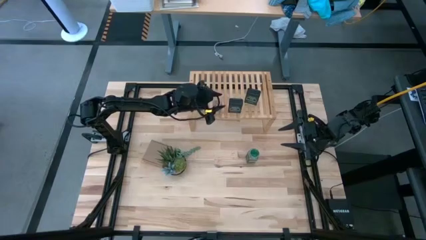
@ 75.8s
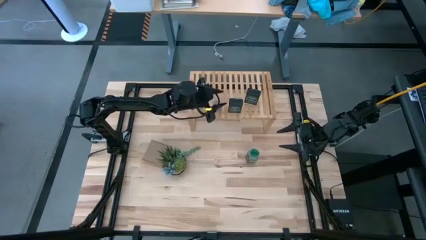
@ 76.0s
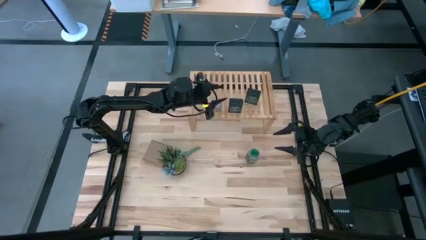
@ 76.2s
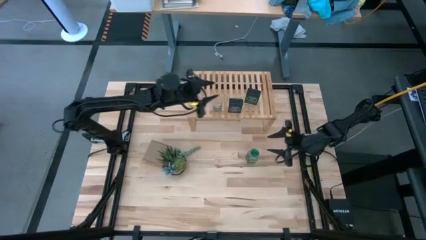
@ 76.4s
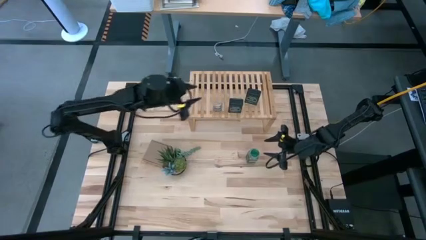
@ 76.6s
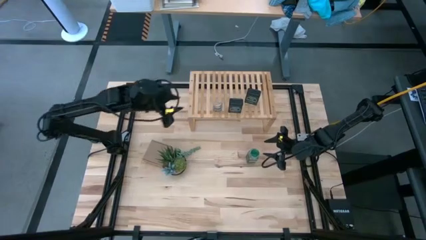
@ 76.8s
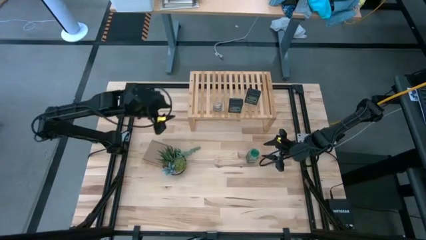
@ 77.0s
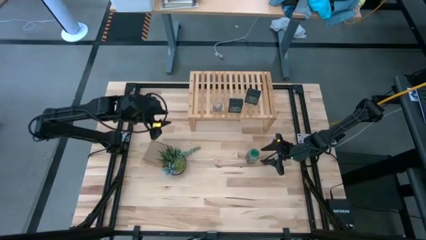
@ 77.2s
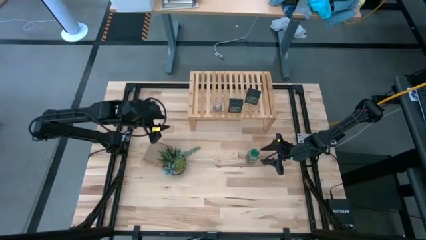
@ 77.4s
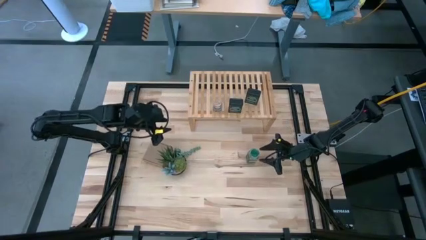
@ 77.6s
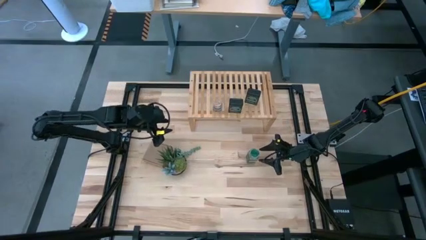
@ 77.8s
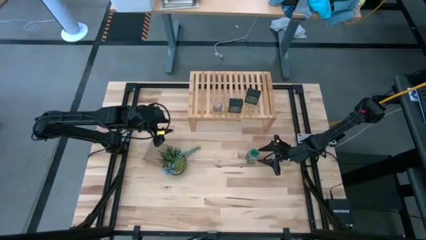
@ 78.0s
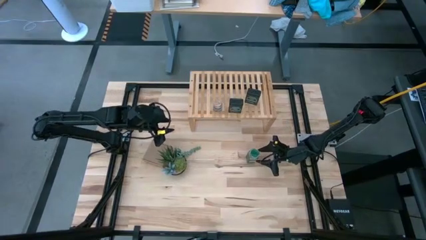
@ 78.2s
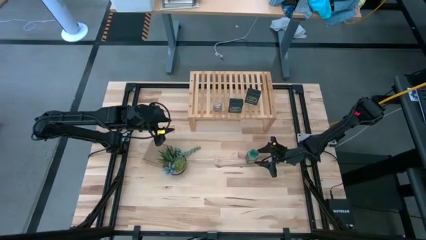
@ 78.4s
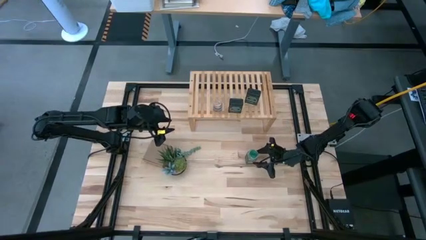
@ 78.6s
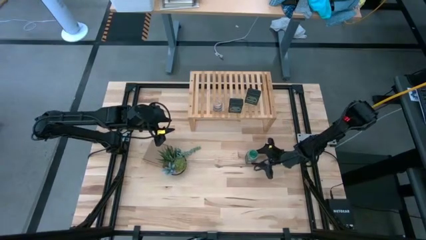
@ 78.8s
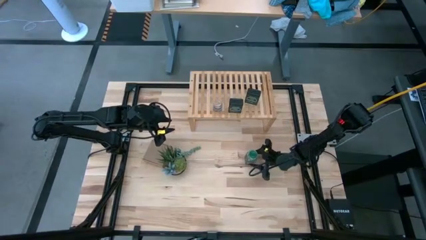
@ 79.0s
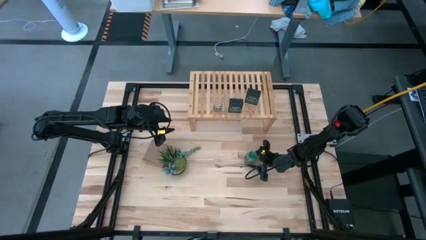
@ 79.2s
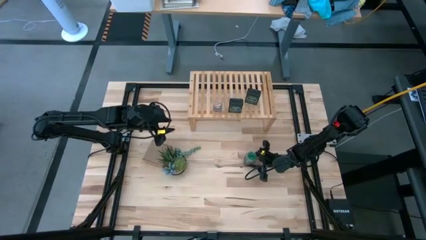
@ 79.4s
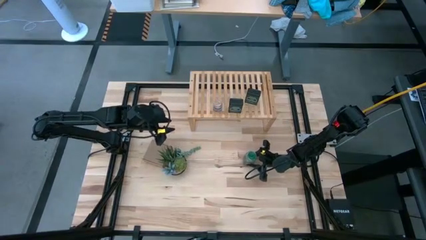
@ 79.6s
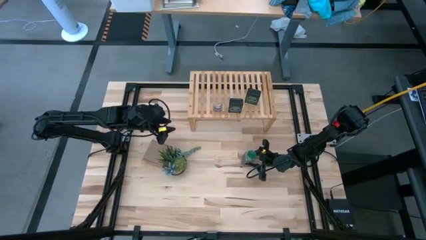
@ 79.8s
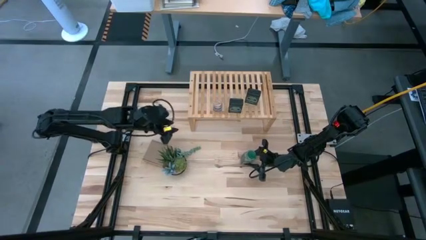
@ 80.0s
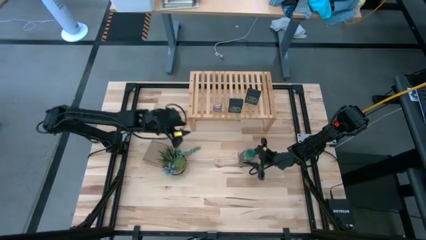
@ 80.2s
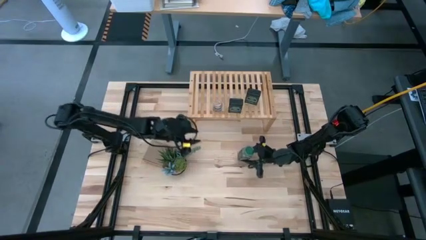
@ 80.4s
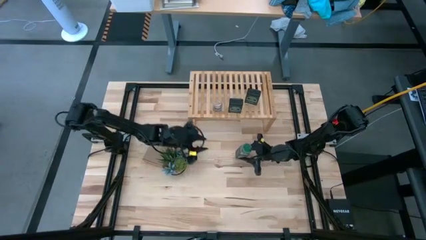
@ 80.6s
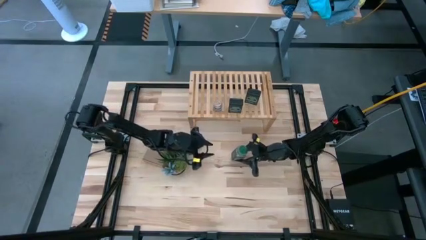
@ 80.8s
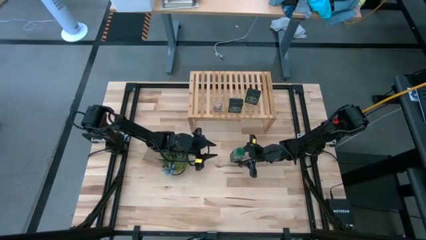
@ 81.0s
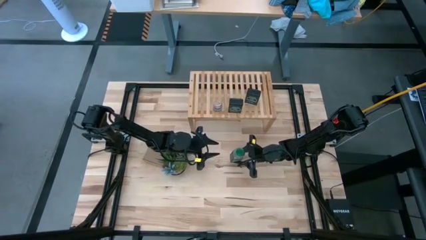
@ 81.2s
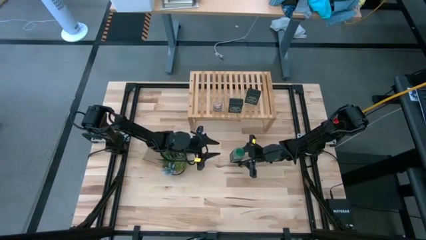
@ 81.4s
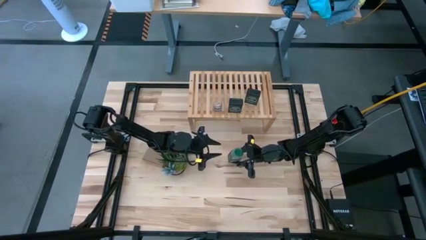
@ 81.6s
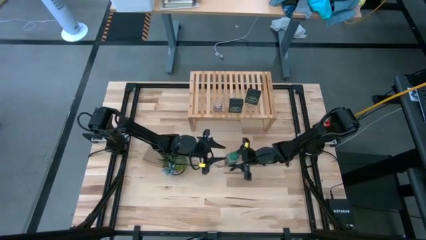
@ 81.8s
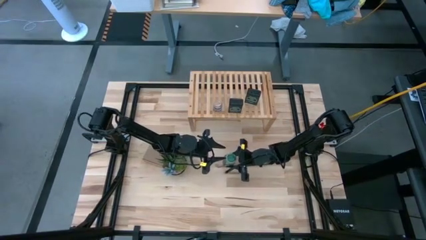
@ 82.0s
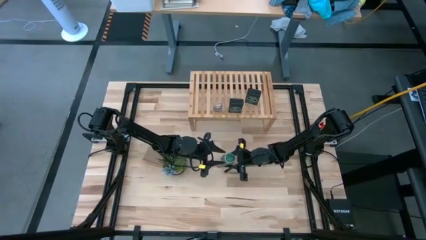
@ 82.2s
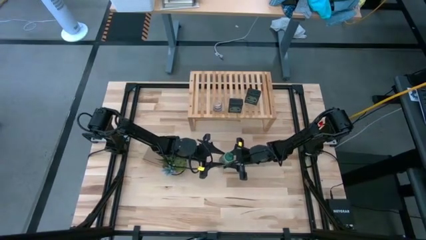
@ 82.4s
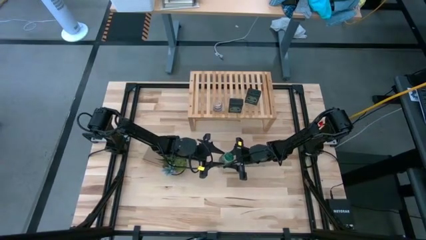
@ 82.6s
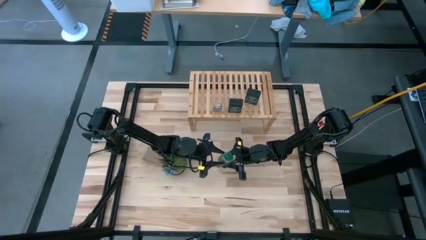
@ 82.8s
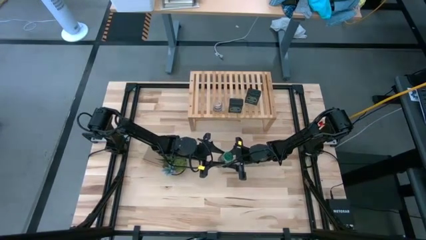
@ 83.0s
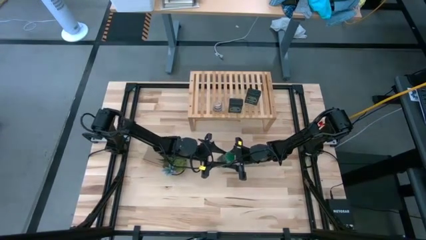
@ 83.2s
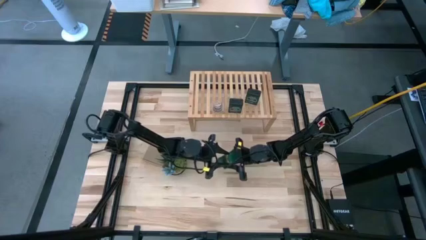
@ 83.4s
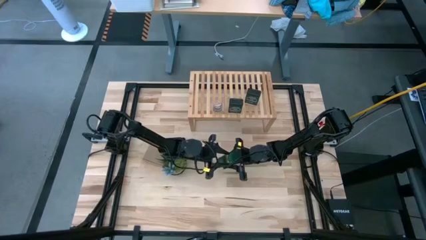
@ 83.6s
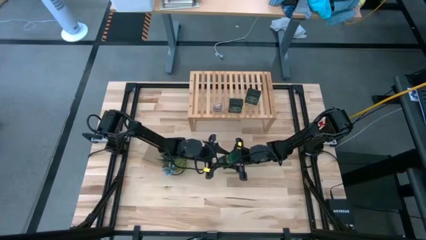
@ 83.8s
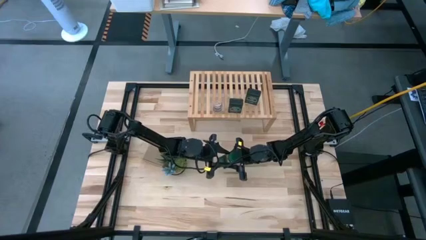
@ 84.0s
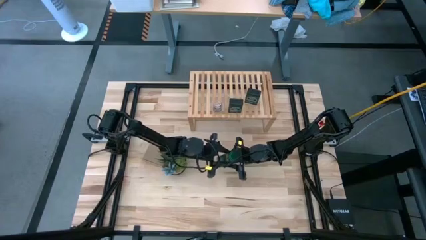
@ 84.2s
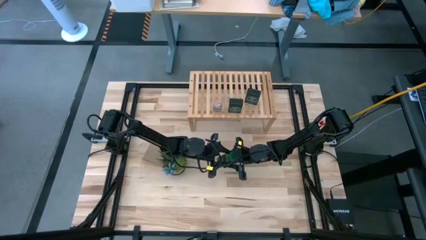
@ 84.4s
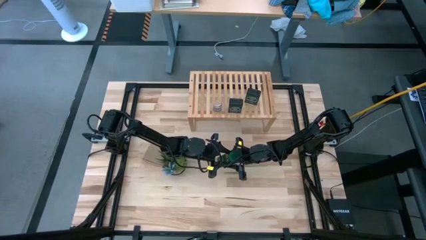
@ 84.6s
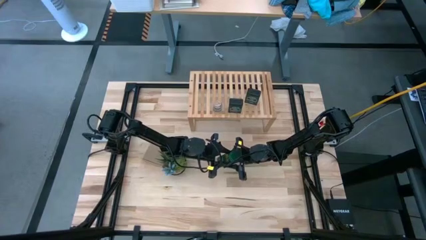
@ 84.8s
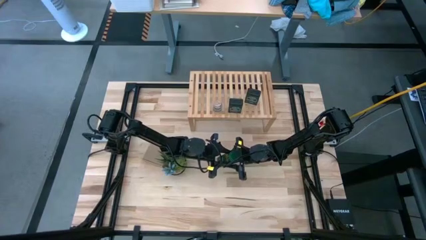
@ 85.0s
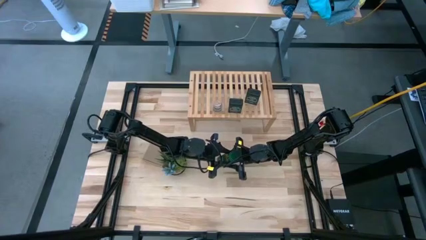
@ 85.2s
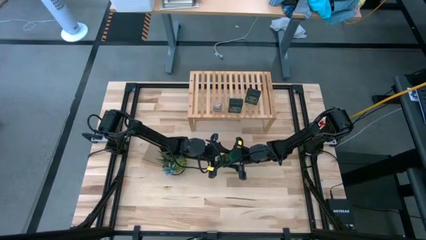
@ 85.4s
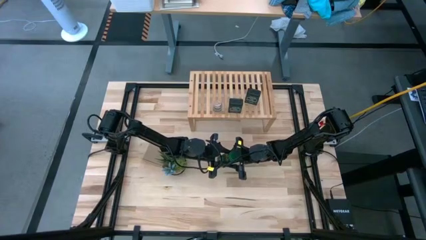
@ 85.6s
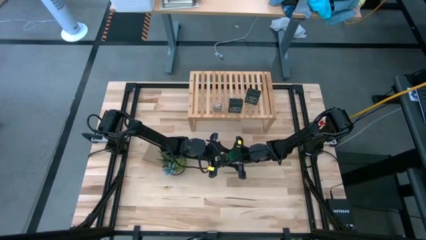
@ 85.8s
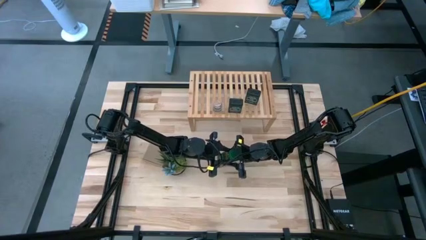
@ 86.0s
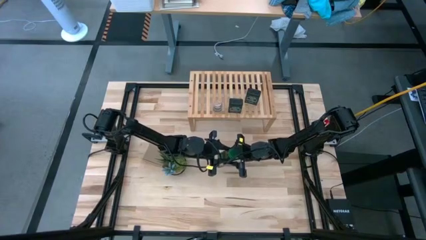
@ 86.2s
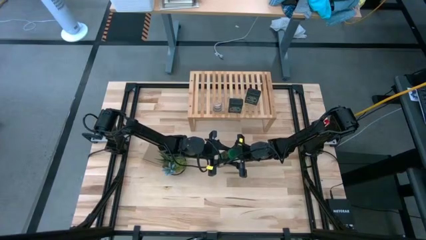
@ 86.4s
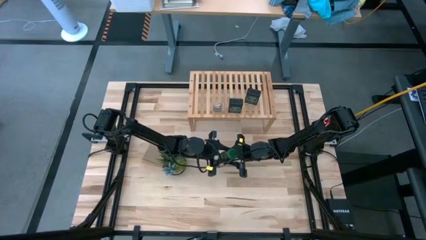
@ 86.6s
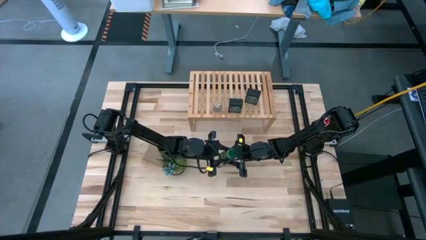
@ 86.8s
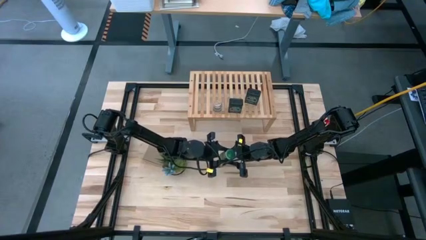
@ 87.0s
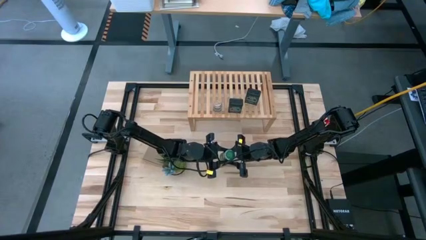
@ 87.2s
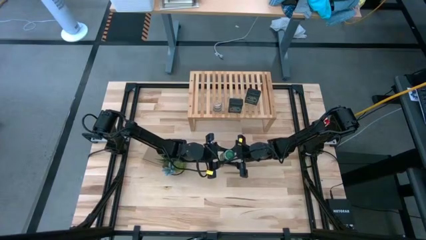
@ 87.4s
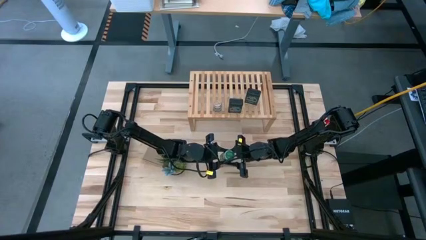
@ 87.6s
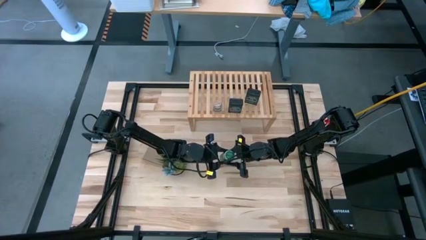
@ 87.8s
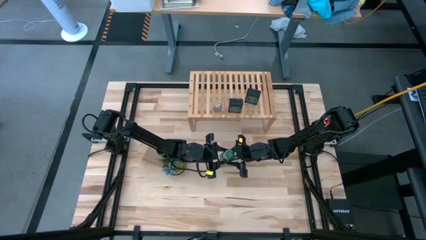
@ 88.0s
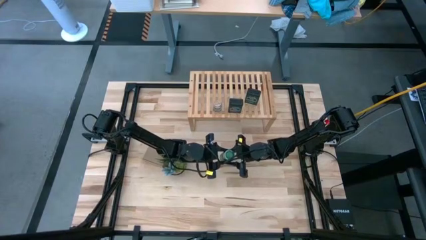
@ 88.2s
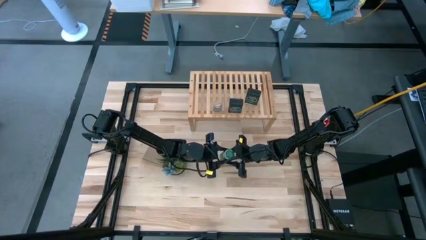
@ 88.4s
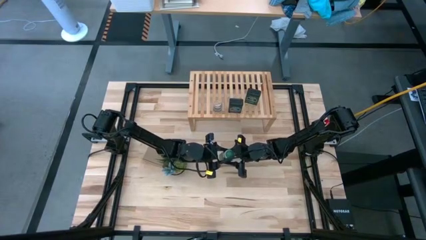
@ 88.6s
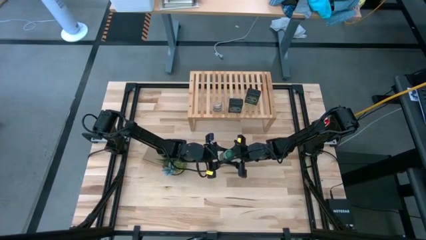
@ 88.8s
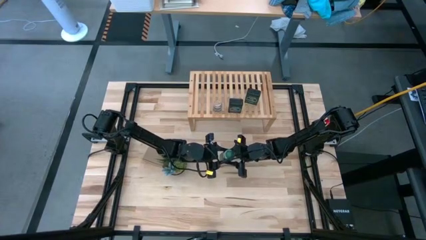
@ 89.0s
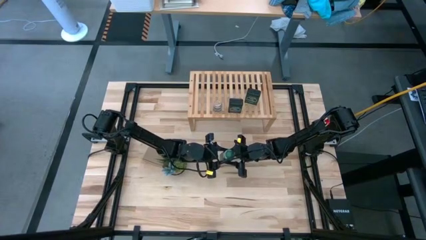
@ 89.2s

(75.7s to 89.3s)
Task: Shelf spices
Put the green seasoning bottle on the shelf

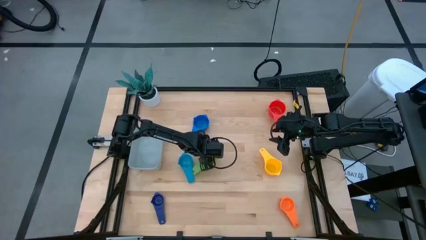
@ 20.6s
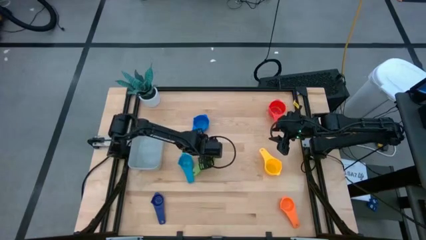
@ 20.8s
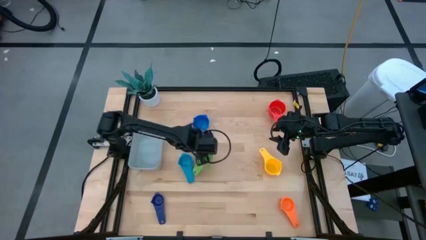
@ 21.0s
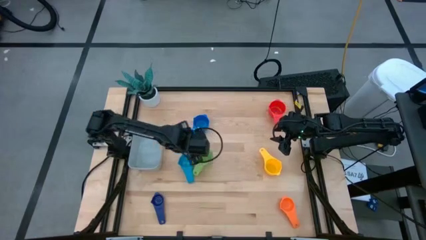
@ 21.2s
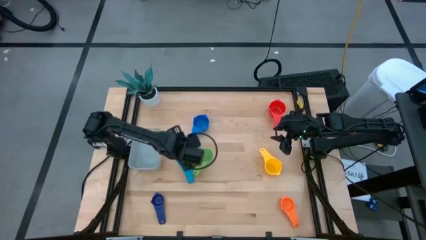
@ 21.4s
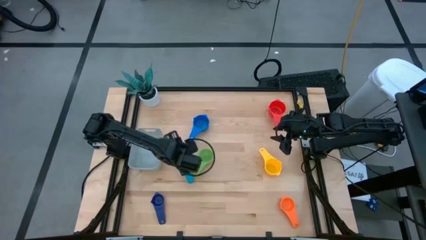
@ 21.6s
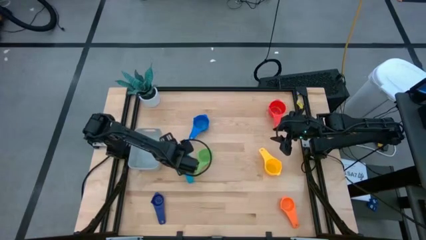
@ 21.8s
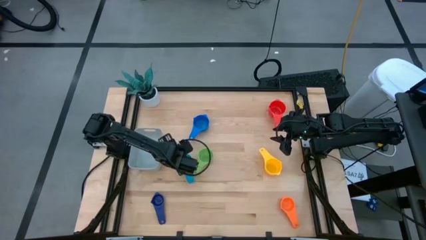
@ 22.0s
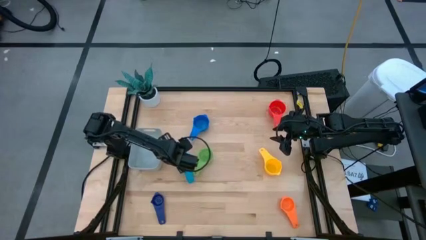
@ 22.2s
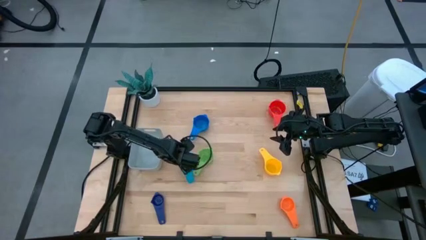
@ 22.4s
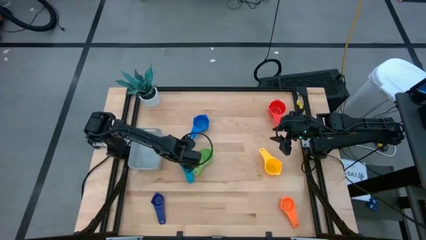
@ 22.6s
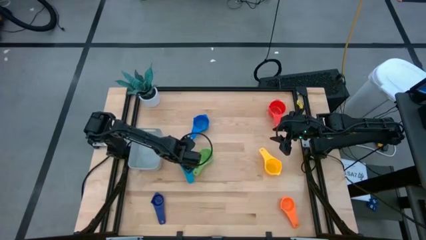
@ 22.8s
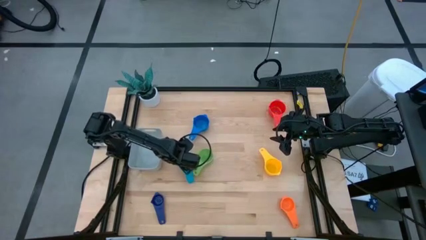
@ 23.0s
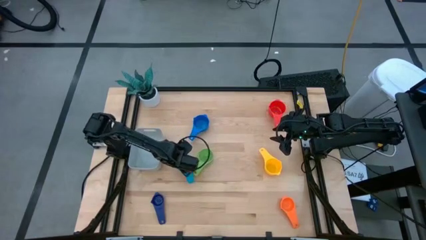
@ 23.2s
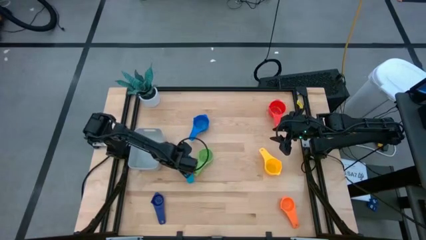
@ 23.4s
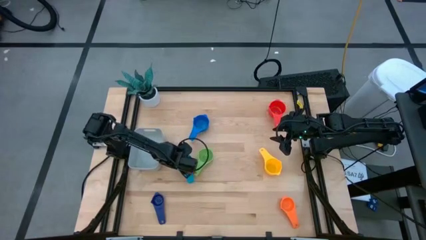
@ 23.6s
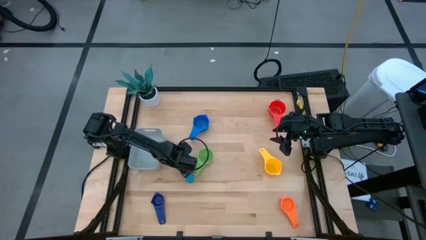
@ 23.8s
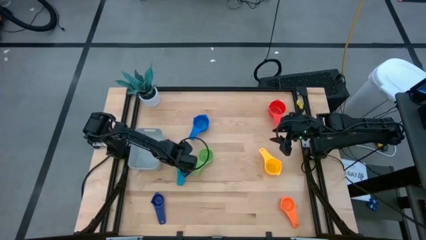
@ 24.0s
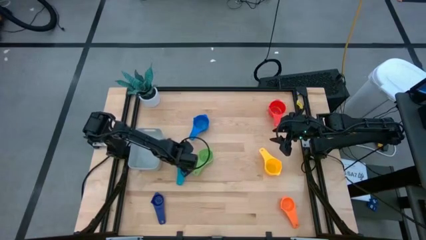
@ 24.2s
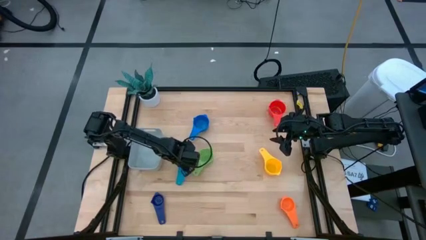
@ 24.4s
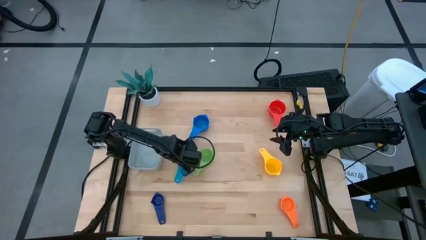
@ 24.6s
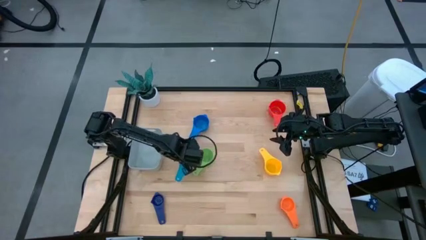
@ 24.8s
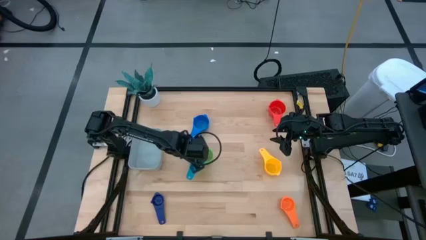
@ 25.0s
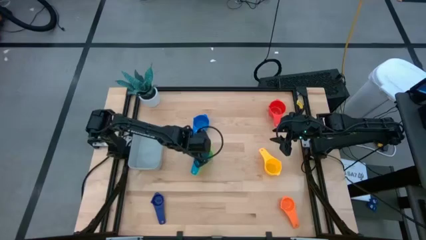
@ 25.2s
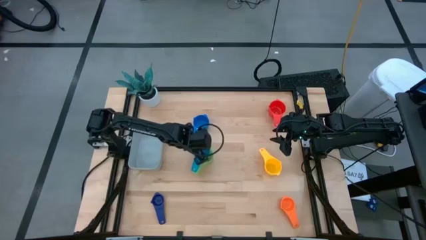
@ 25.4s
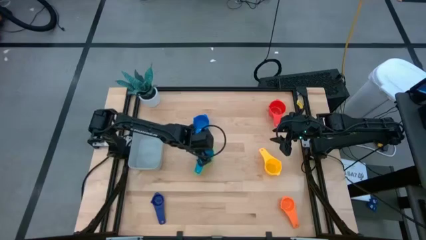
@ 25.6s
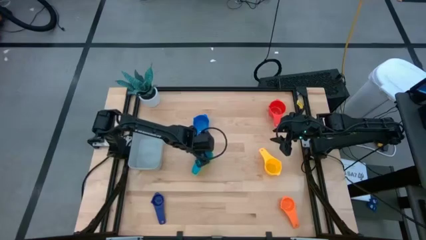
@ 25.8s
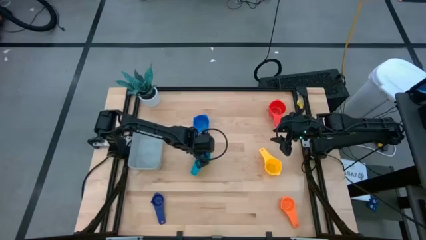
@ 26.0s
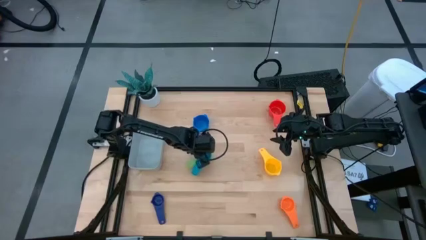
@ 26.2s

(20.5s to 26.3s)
Task: Nest measuring cups in basket
Stack the bottom light blue measuring cup on top of the green measuring cup
